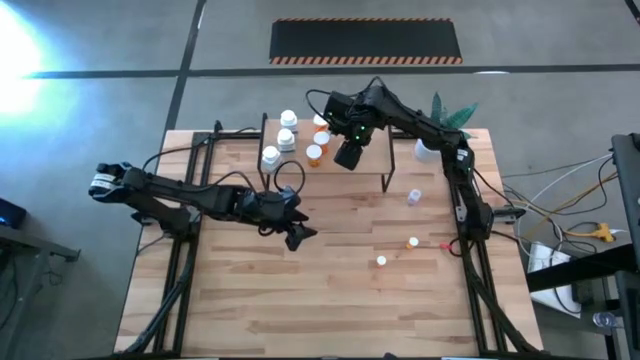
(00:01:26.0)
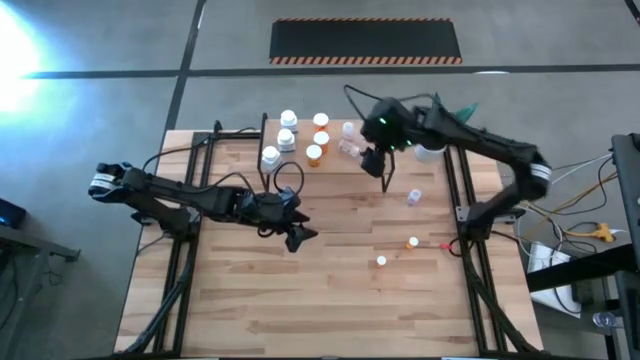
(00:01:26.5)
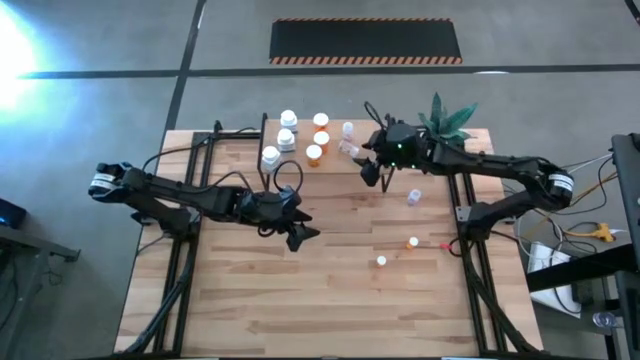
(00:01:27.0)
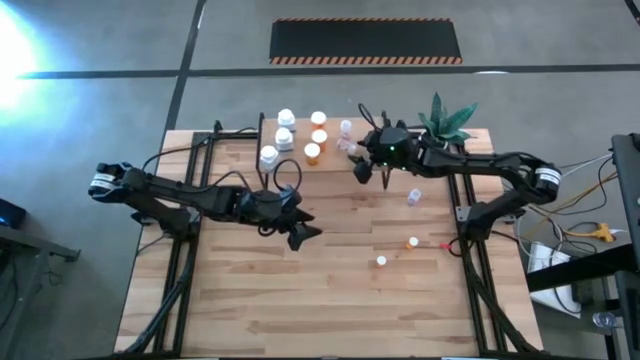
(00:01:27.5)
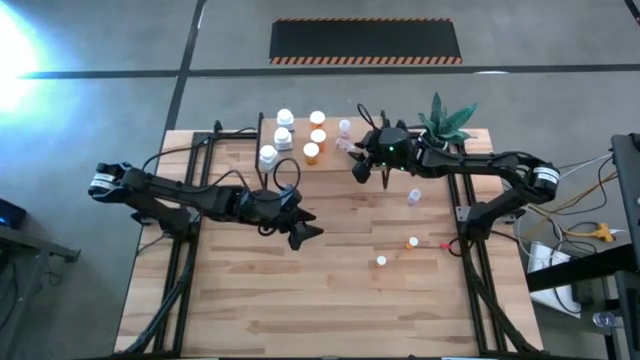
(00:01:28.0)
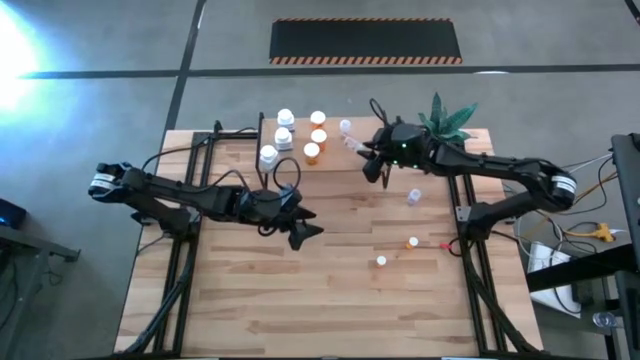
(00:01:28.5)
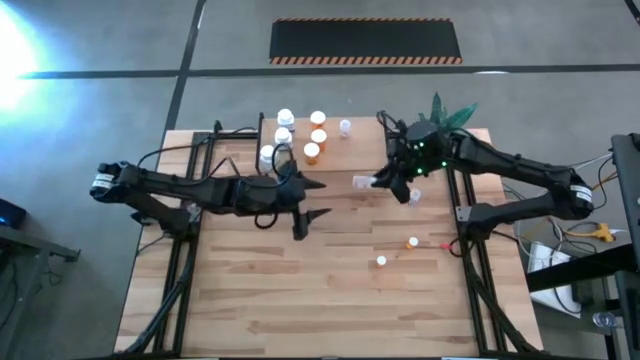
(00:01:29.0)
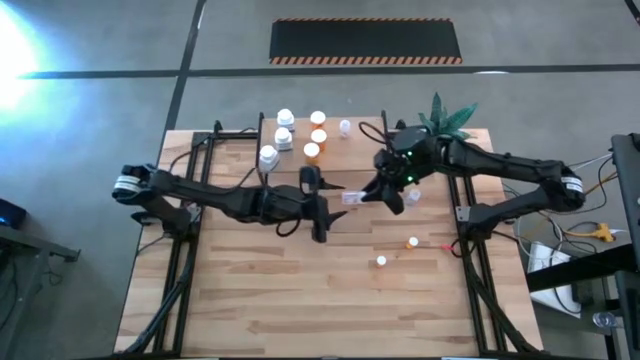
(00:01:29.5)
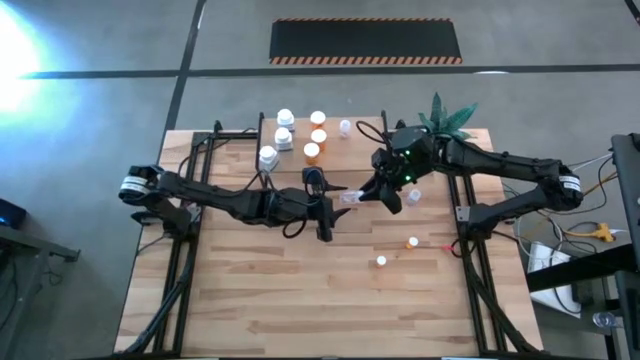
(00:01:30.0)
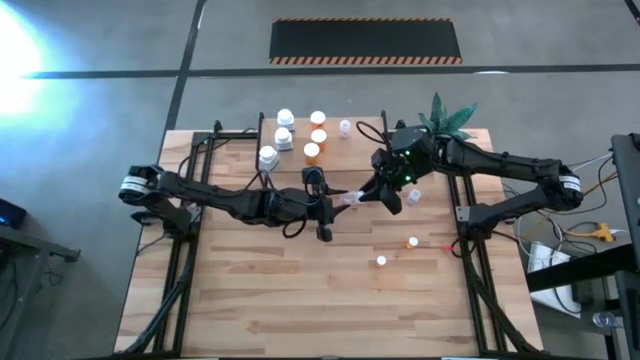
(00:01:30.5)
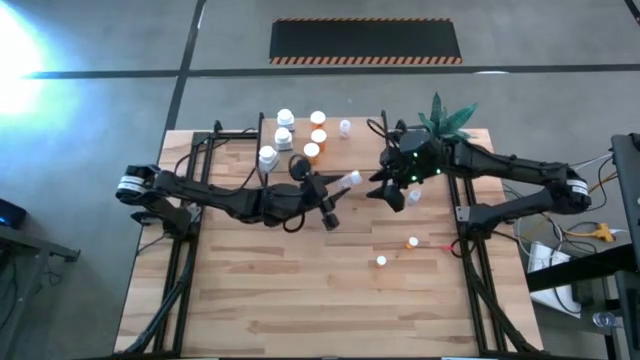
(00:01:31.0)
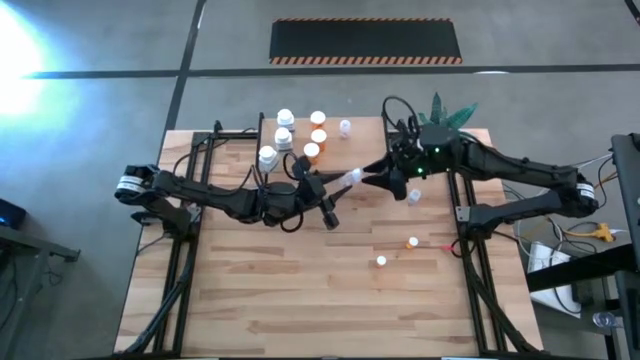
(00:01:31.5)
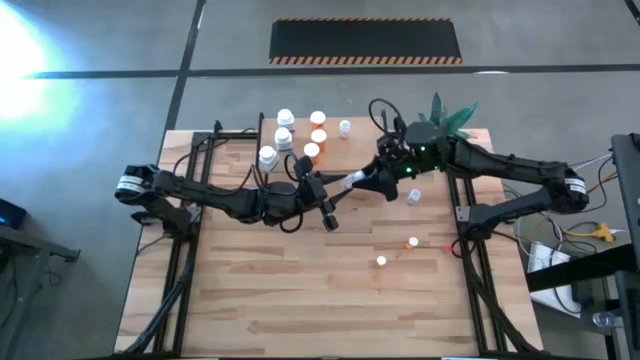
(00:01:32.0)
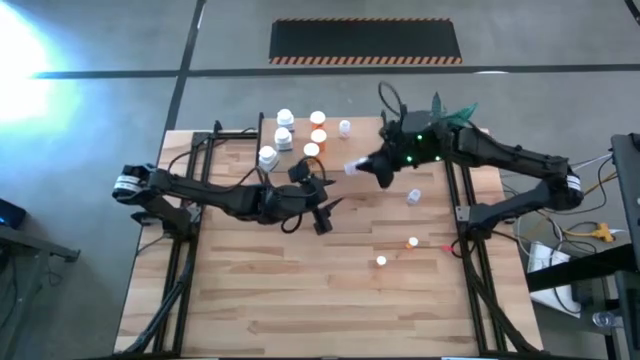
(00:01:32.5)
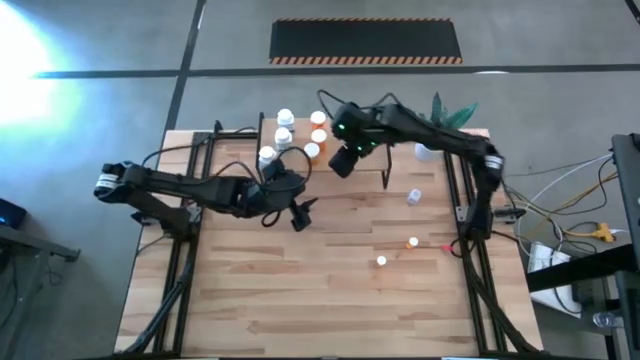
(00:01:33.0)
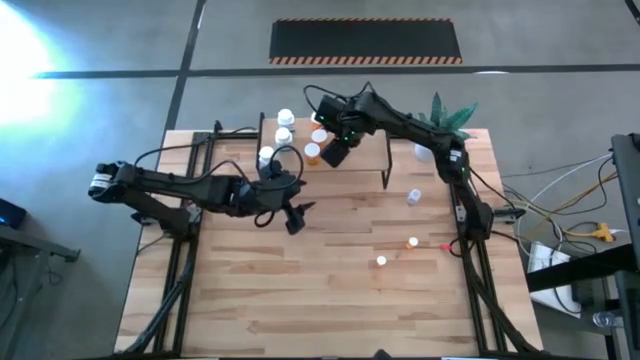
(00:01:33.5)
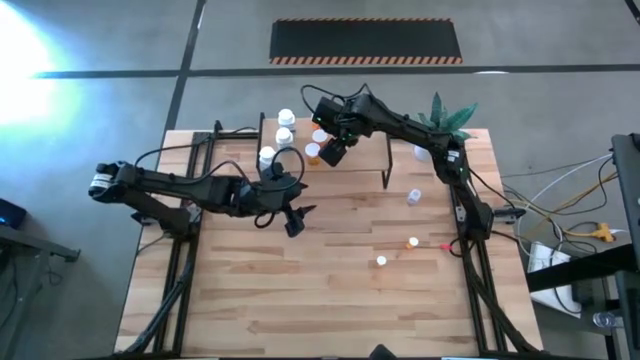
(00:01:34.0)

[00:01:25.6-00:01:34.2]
Task: Pick and place medicine bottles onto shelf by color
Put the left transparent pill bottle on the shelf aligned with the other transparent pill bottle

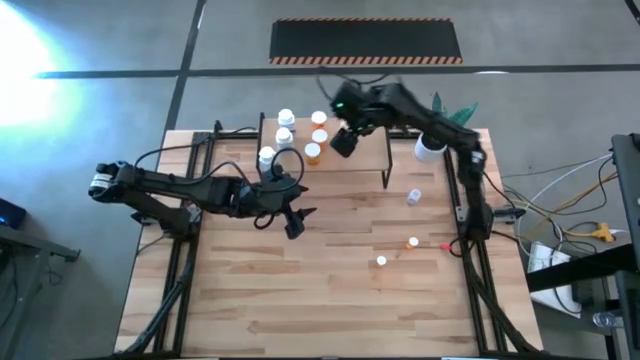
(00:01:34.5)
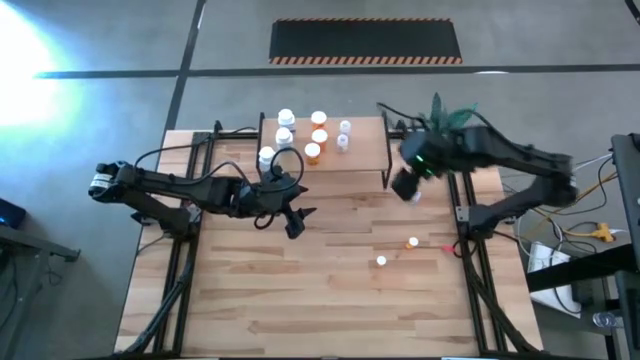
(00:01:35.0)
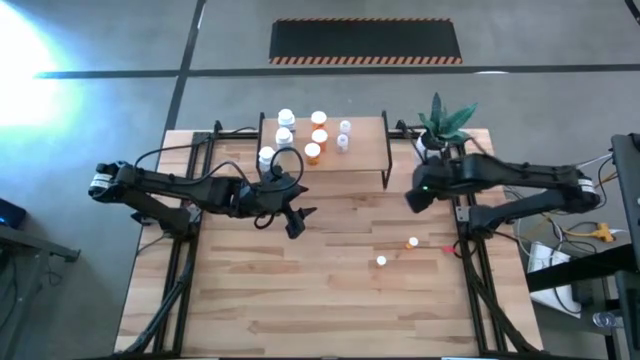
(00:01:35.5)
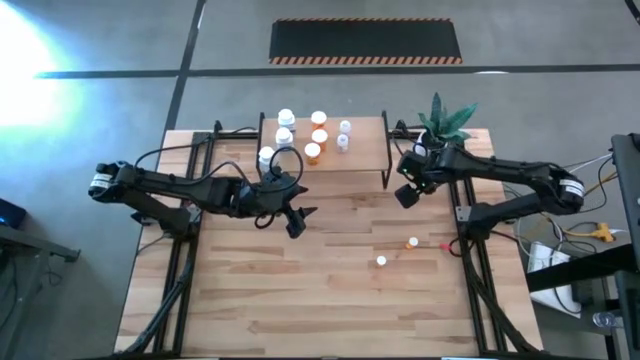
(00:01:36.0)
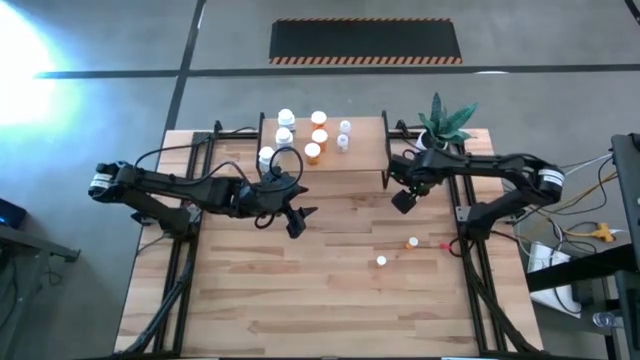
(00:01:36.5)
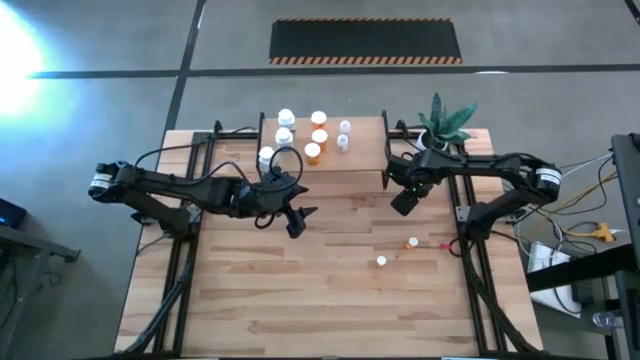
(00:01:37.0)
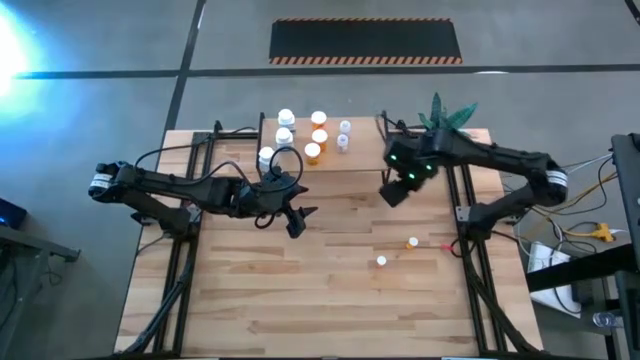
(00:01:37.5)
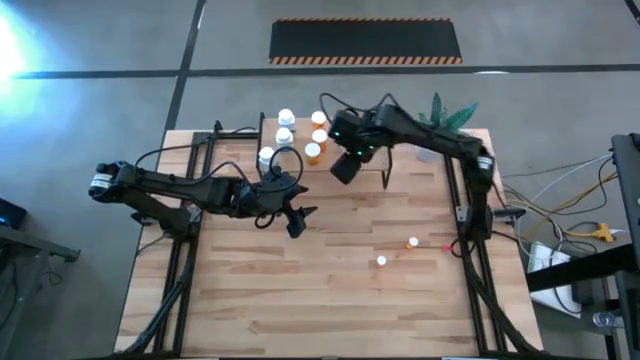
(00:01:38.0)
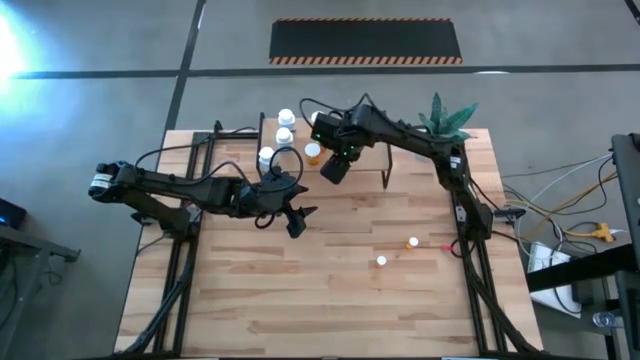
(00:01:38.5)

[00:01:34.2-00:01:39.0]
Put the transparent pill bottle on the shelf aligned with the other transparent pill bottles

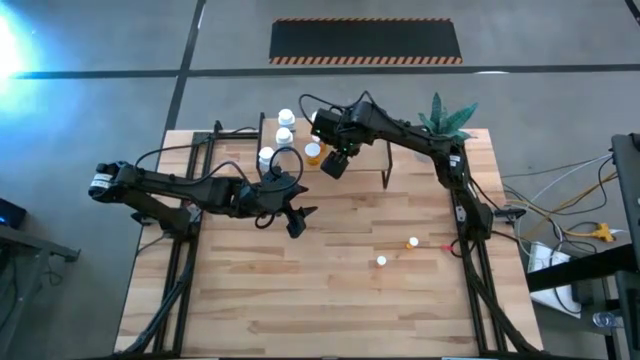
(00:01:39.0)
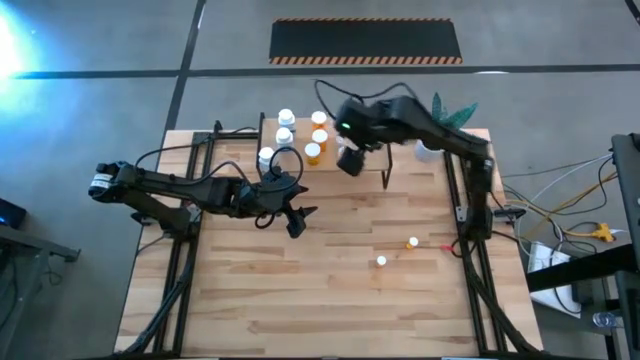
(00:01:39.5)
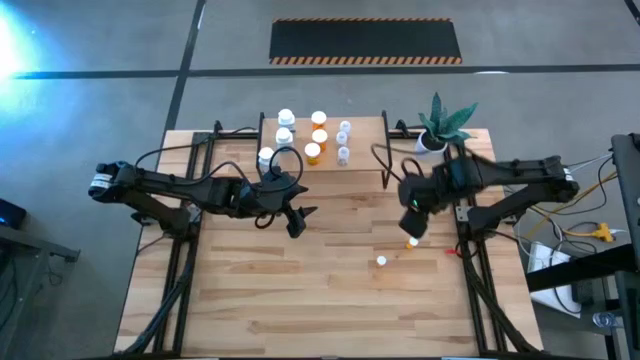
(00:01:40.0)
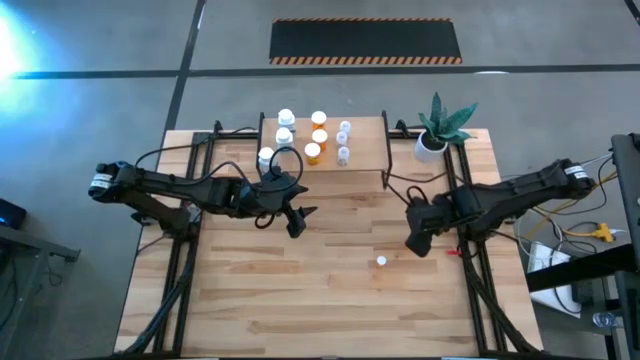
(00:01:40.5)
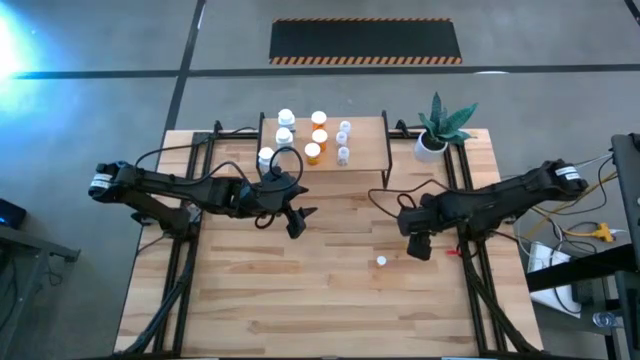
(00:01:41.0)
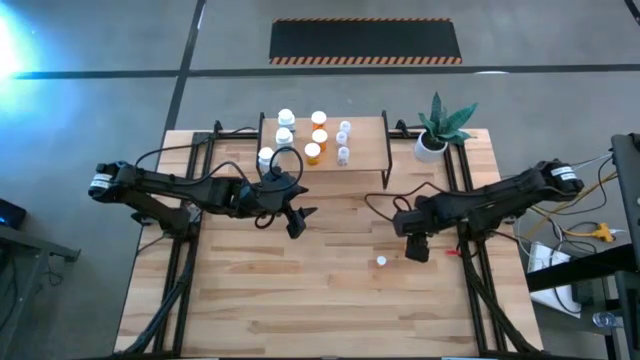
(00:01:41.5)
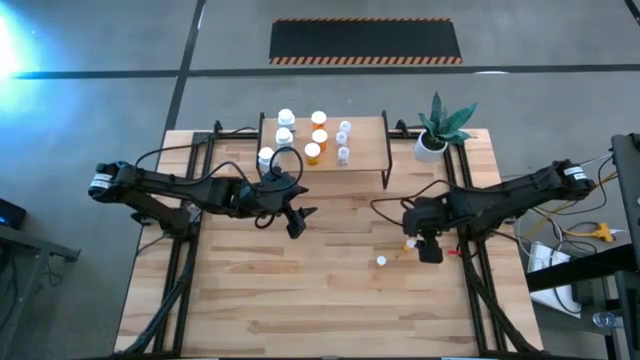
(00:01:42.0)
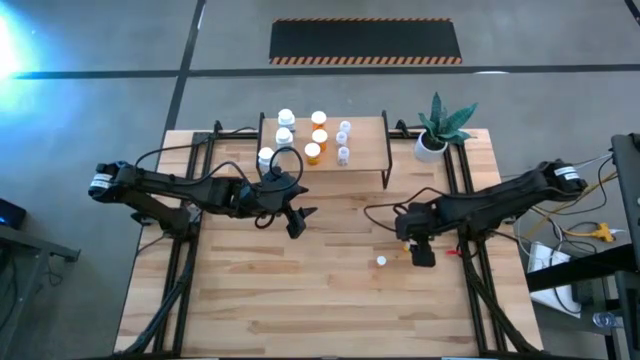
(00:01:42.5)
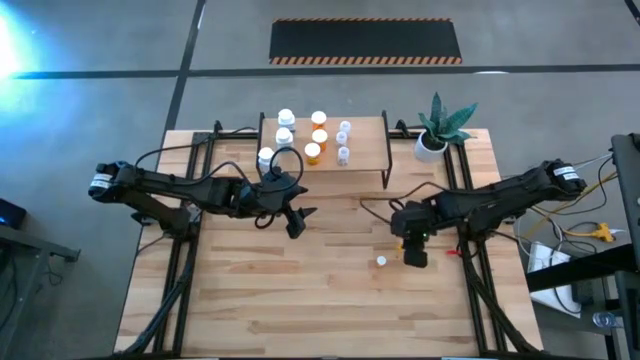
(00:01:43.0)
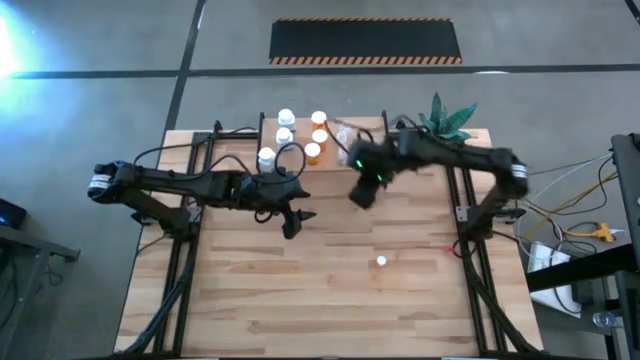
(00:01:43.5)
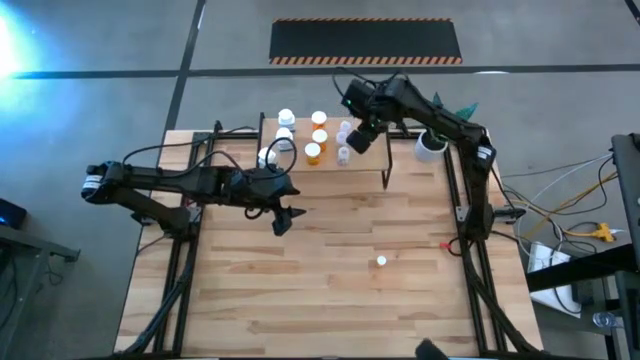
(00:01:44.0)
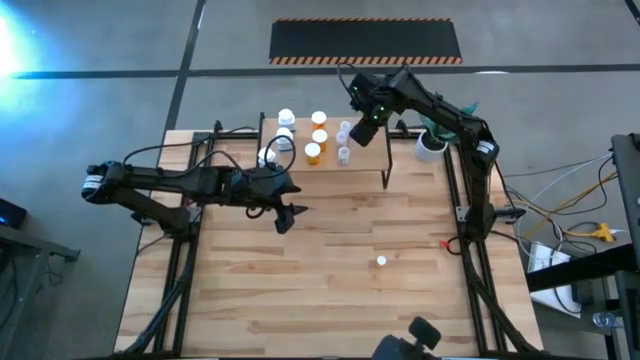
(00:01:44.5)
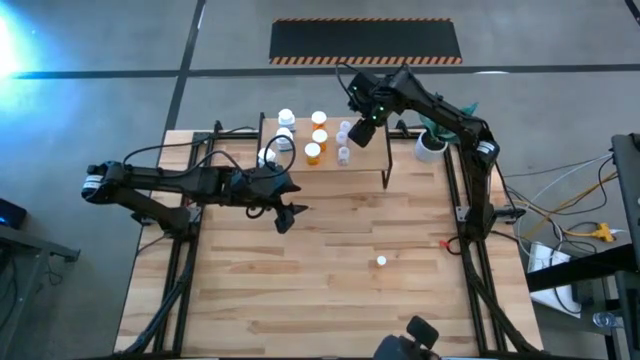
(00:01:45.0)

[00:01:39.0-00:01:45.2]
Put the right small orange pill bottle on the shelf

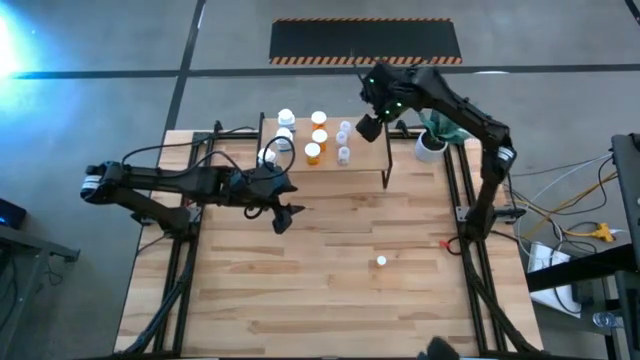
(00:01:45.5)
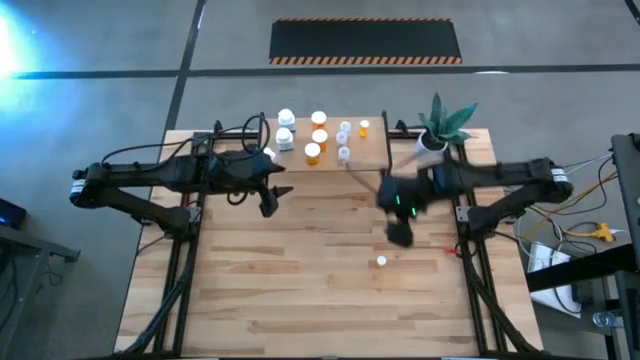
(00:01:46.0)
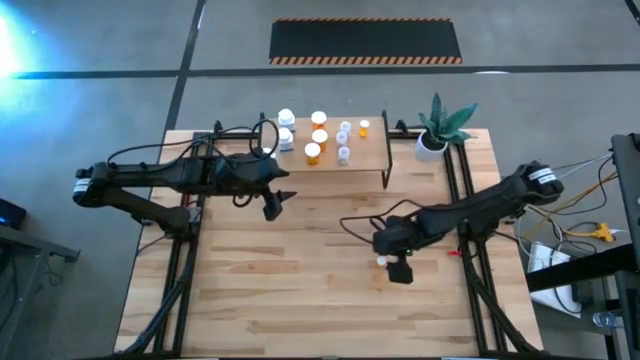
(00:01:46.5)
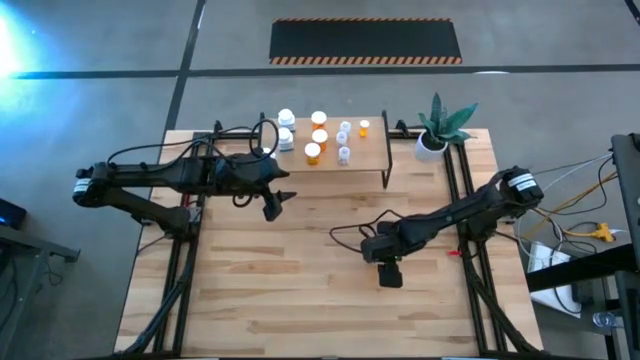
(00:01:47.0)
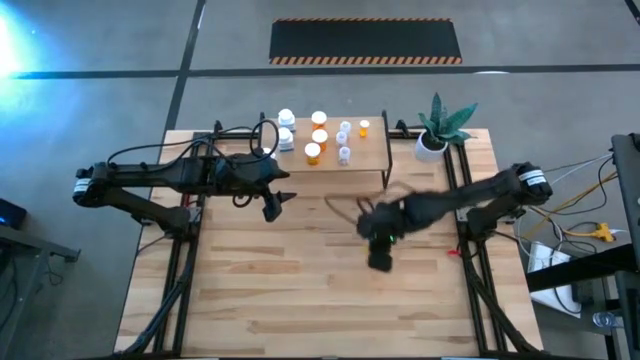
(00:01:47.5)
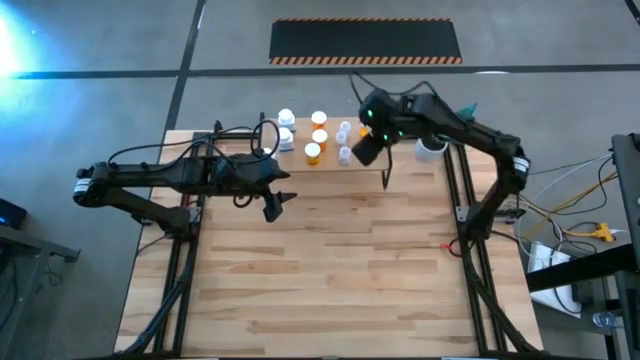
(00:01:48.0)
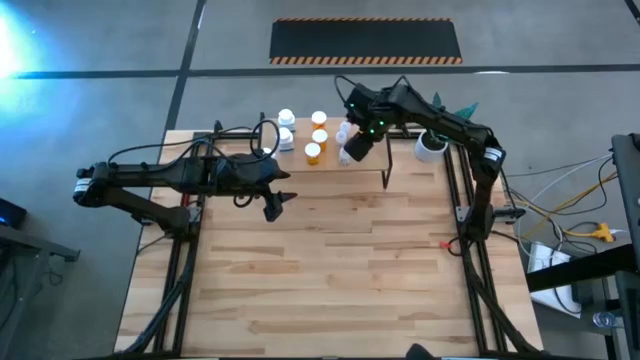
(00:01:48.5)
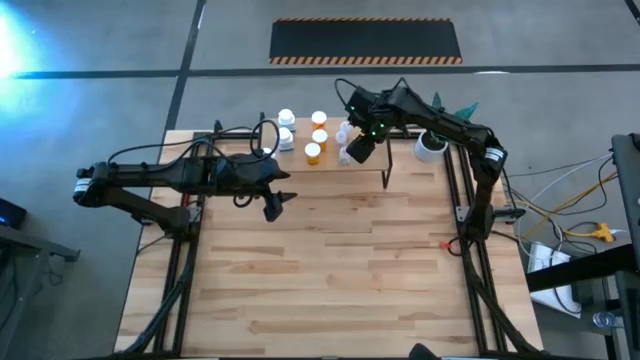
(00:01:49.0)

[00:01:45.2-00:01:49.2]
Put the small orange pill bottle on the shelf aligned with the other small orange pill bottle
